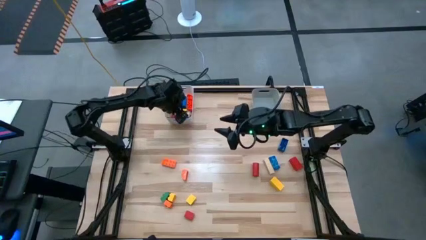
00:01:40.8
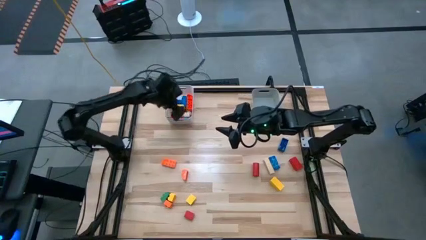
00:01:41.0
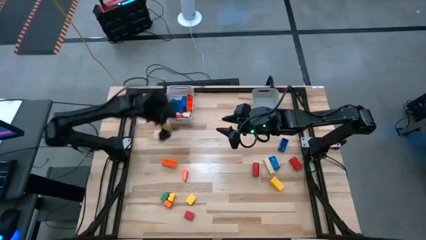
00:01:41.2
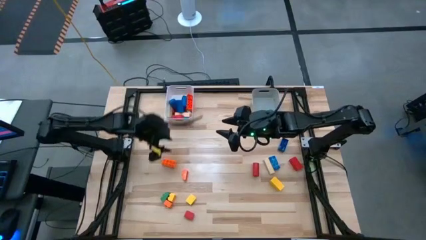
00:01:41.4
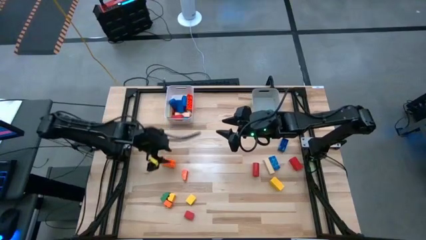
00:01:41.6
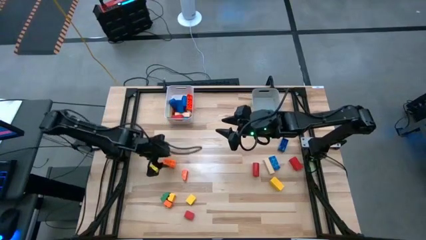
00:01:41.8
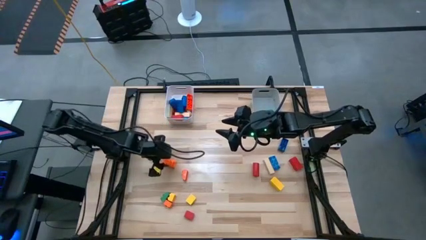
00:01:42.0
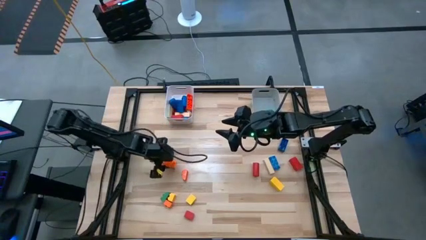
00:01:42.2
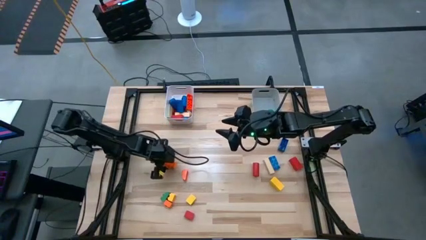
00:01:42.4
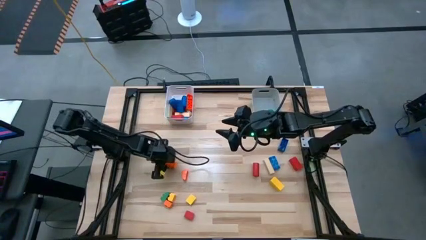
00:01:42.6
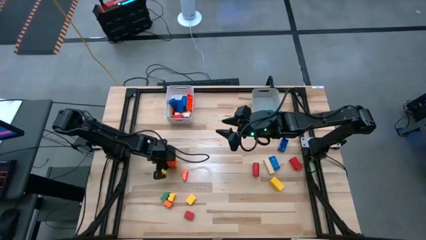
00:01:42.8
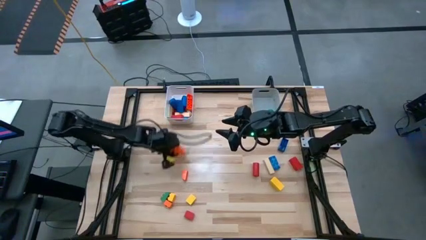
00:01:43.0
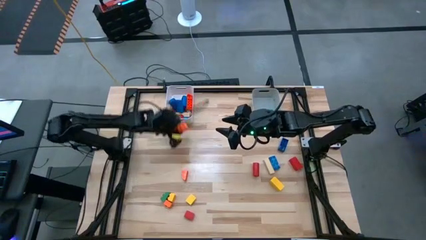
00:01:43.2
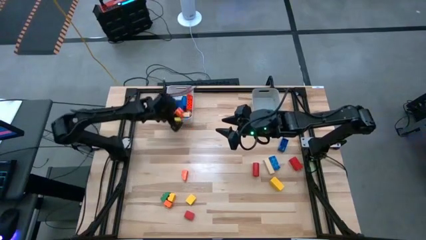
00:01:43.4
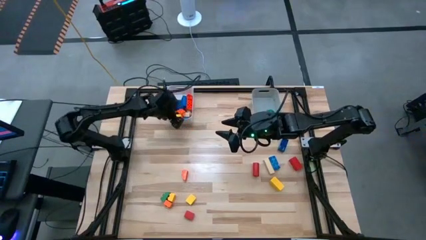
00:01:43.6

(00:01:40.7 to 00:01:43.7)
Task: Sort blocks by size
Put the orange rectangle game piece into the white bin

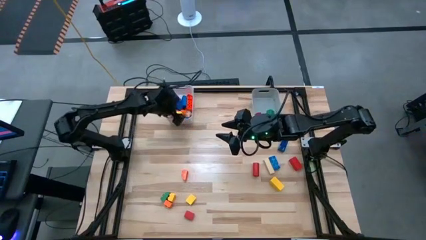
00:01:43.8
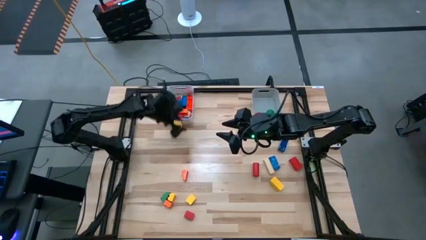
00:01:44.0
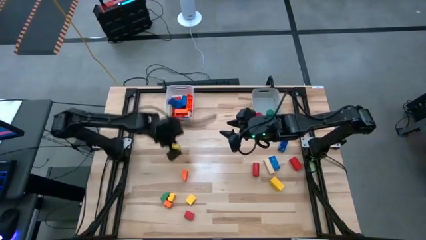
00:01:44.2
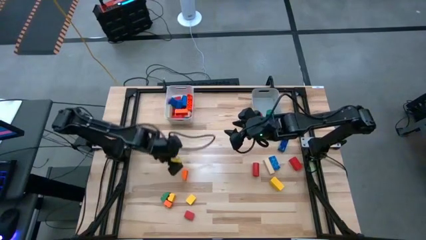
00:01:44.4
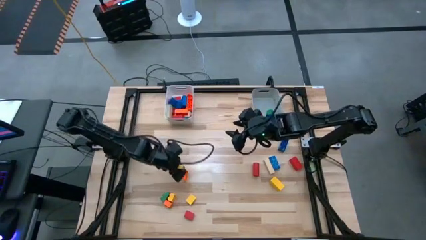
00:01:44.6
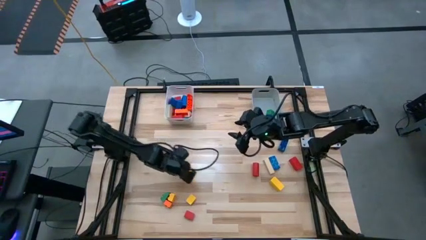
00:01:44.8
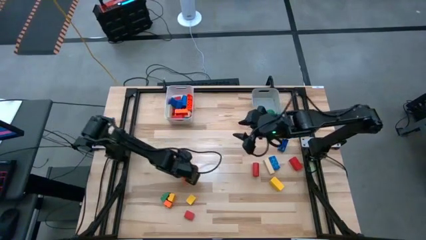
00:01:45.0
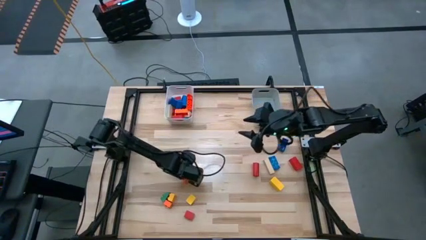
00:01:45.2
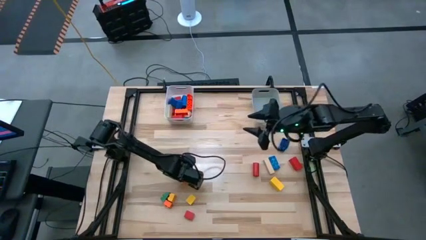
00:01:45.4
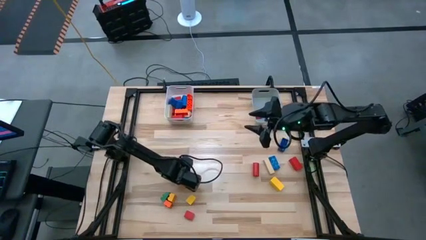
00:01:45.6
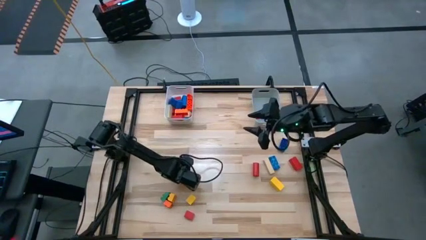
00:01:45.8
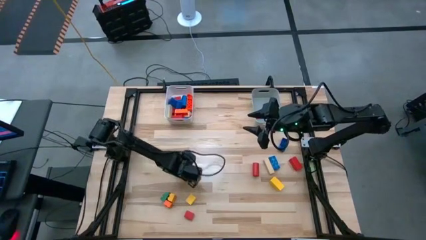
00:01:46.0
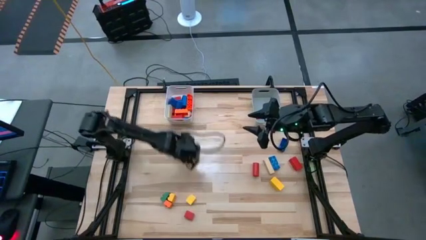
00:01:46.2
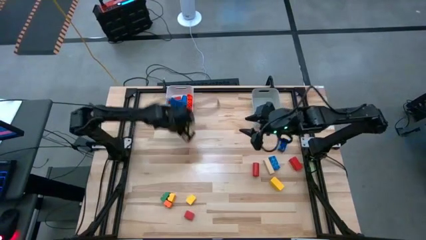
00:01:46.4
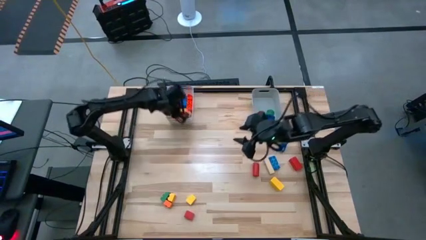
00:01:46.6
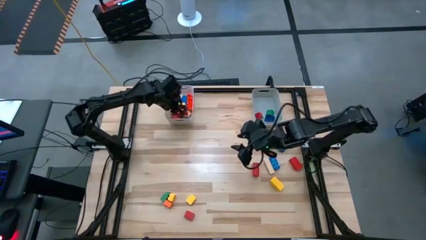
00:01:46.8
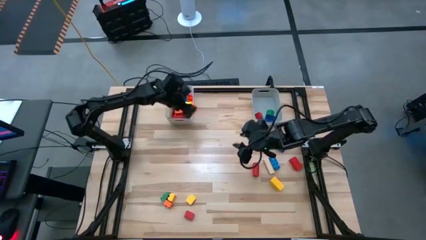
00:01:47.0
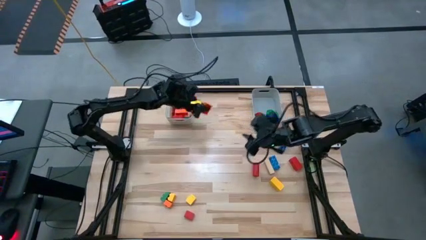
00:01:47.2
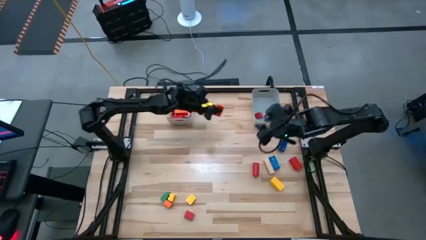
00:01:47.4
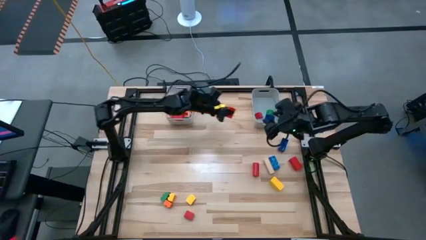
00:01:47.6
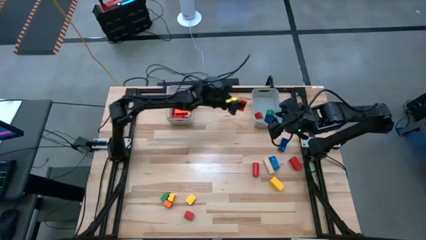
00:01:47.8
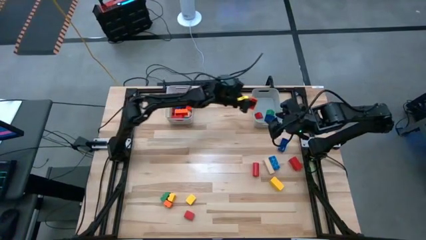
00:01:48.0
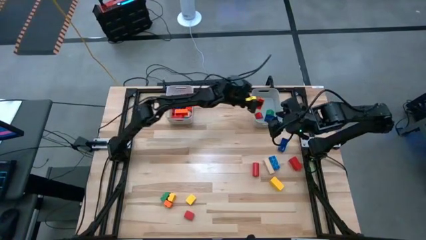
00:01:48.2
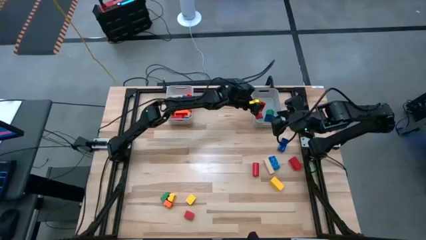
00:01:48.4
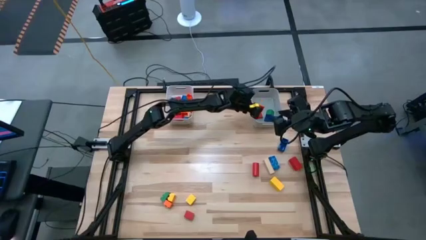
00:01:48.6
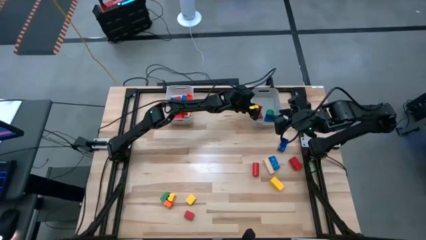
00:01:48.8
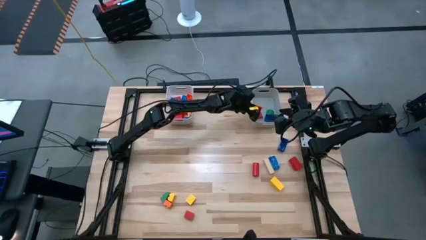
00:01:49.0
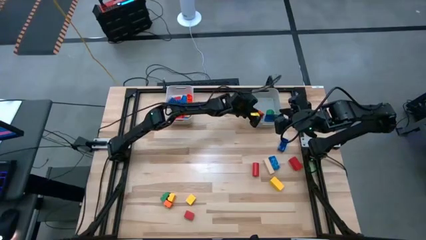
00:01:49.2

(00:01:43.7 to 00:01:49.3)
Put the orange cuboid game piece into the gray bin

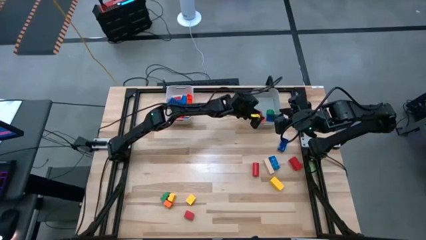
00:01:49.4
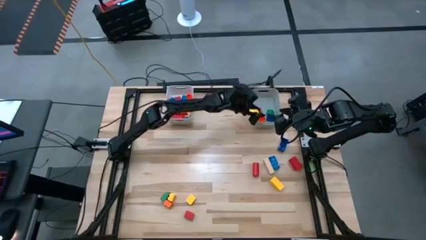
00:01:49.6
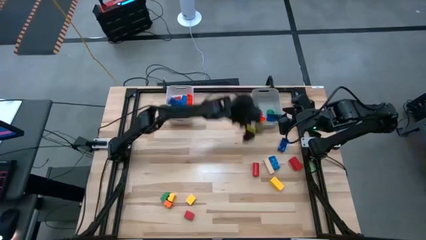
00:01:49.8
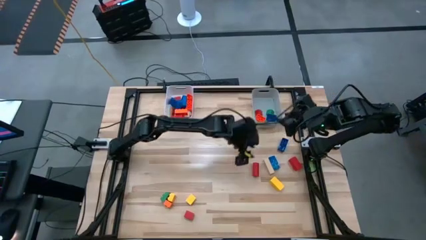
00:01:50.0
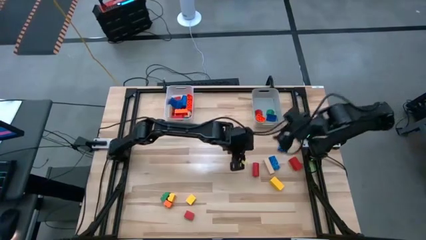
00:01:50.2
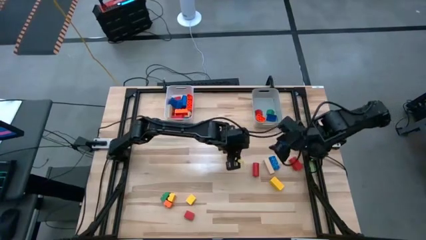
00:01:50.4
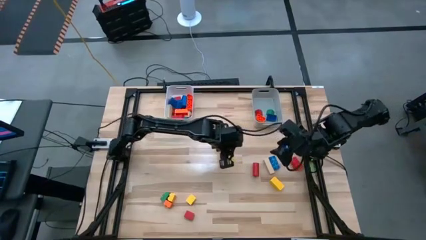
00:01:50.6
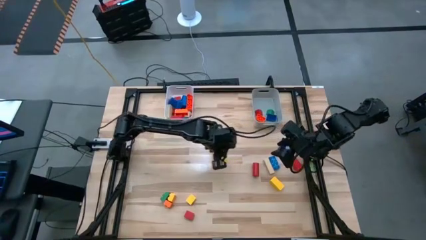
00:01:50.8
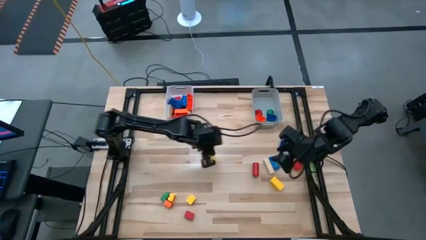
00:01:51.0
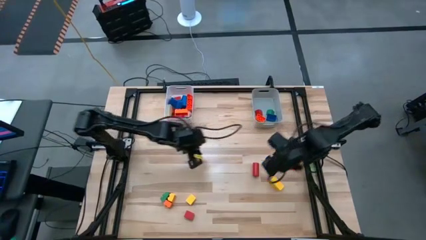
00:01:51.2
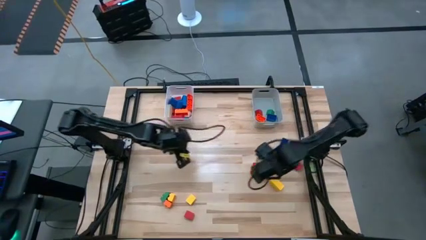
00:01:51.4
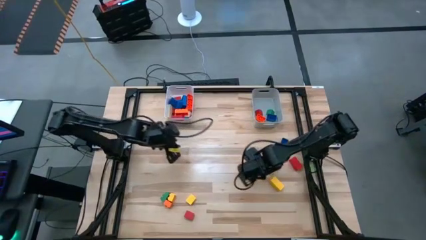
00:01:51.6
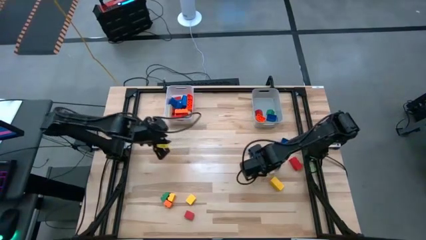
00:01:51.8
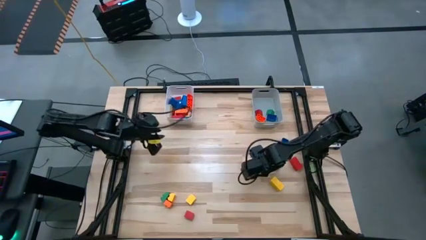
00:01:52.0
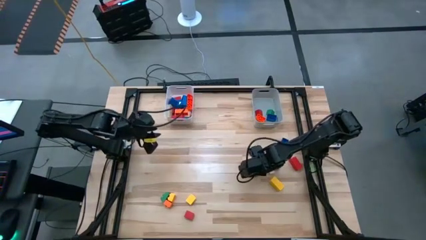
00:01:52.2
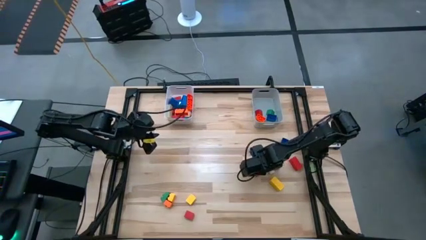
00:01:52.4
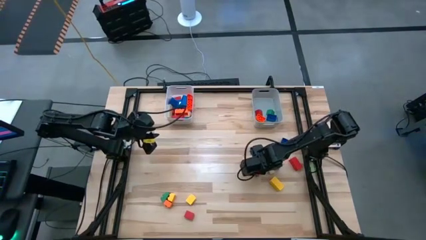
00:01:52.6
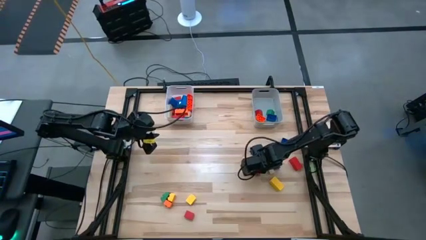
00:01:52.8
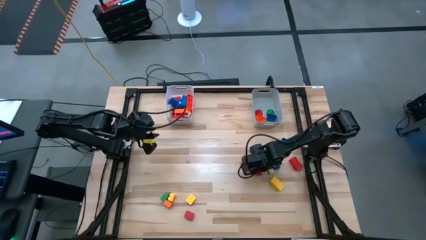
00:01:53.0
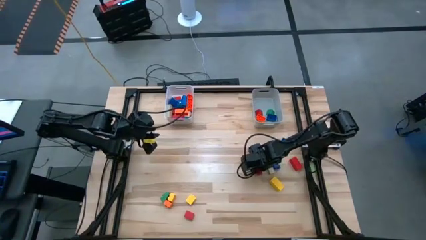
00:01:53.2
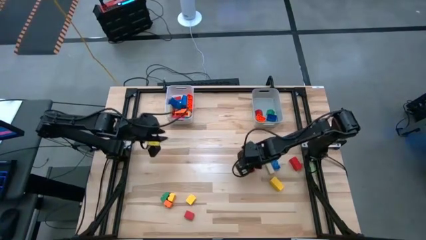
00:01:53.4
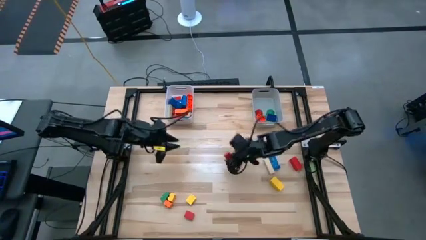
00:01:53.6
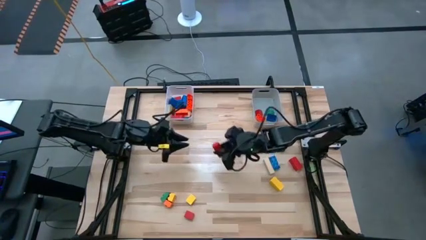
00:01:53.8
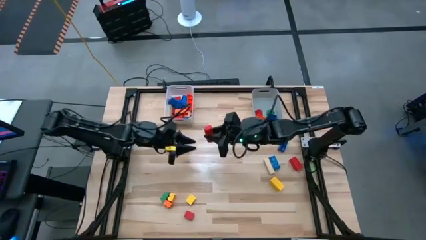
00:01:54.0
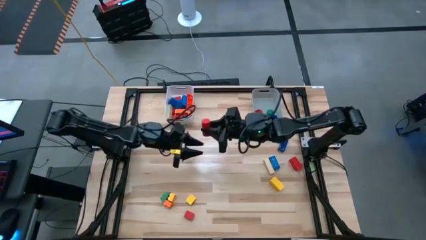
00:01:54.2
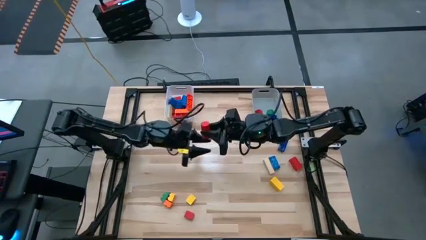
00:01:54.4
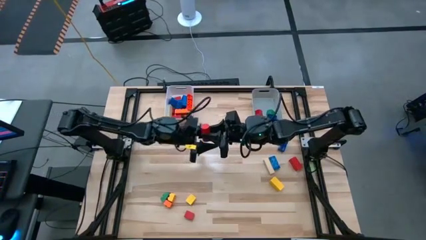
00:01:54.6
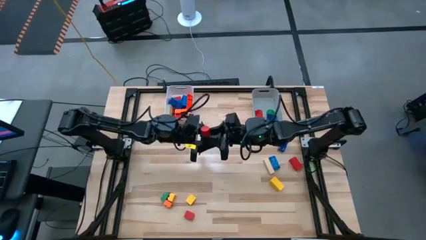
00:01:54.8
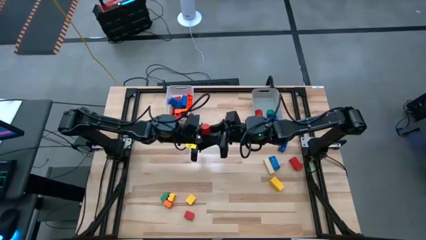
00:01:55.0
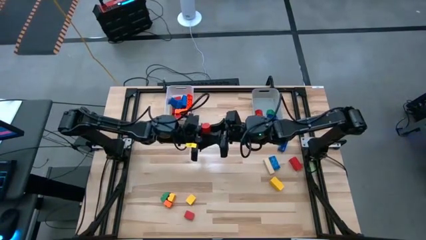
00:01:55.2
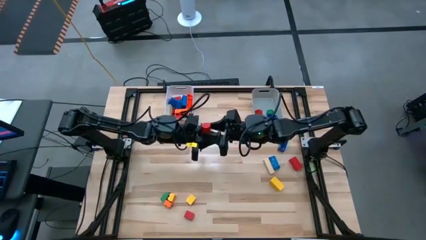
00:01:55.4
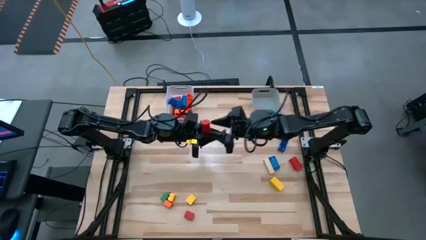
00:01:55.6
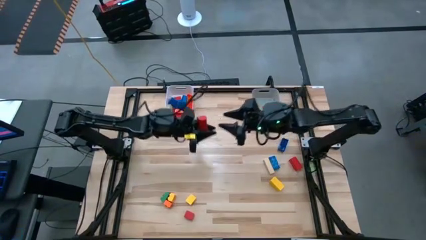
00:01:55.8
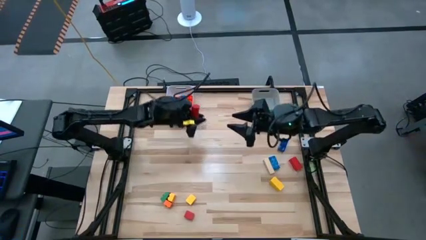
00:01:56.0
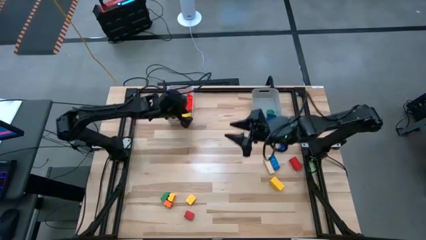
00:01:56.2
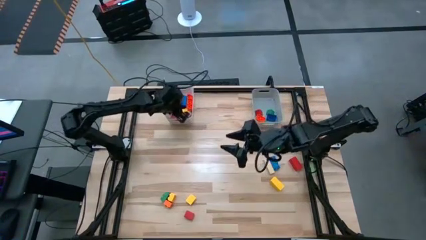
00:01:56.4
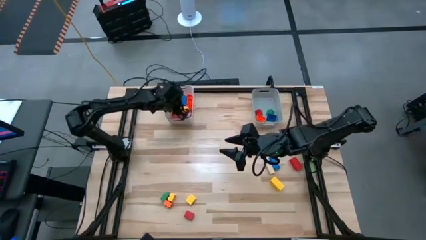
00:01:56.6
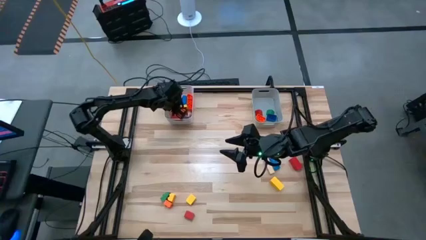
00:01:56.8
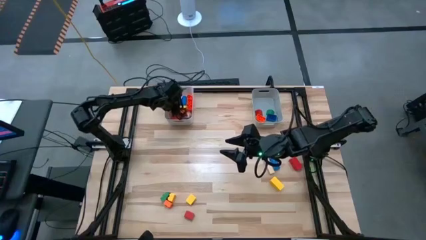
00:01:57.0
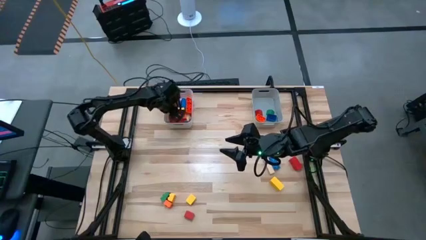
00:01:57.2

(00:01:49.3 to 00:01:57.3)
Put the red cylinder wooden block into the white bin
